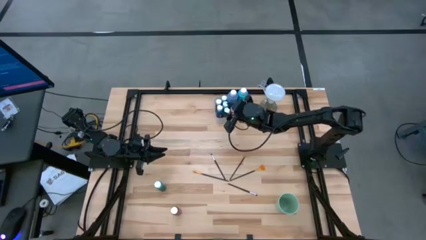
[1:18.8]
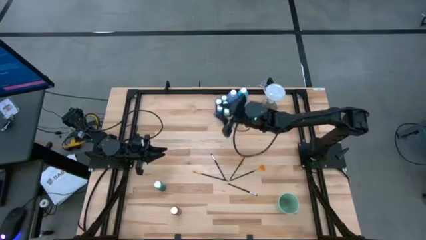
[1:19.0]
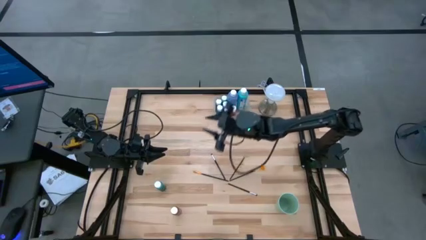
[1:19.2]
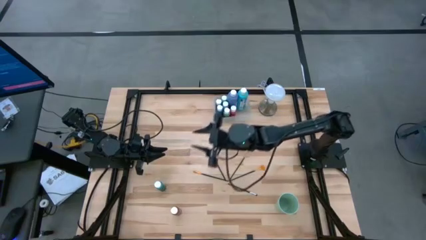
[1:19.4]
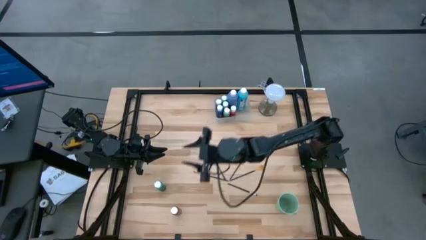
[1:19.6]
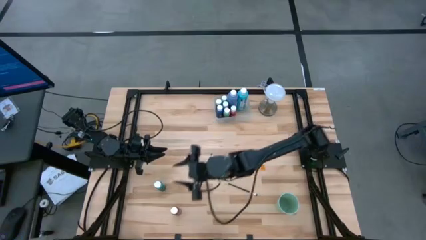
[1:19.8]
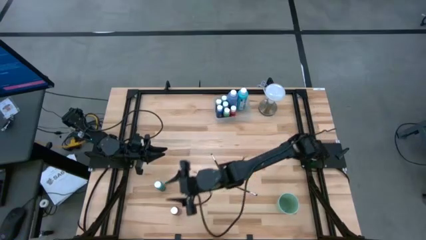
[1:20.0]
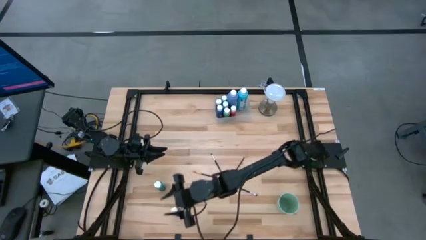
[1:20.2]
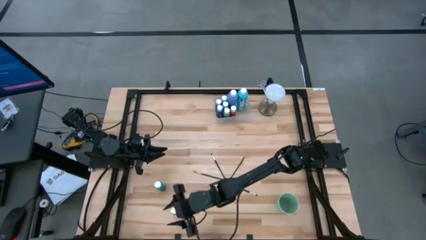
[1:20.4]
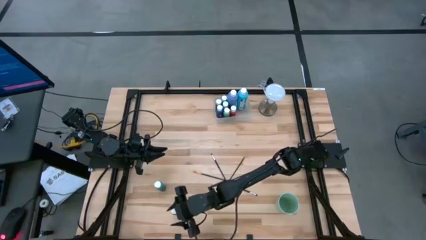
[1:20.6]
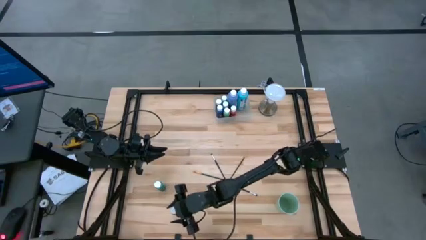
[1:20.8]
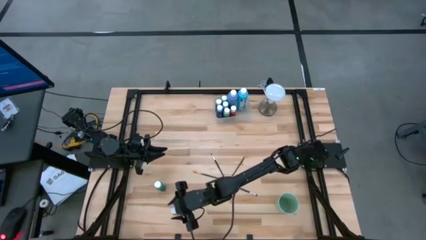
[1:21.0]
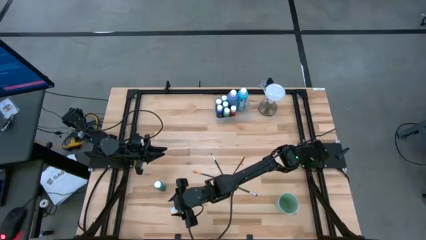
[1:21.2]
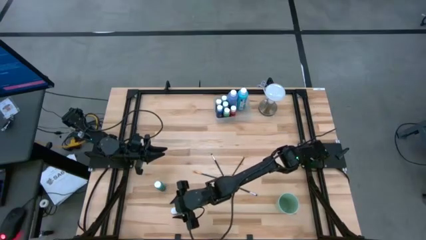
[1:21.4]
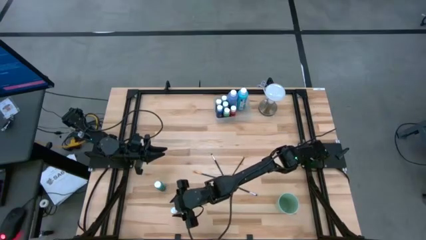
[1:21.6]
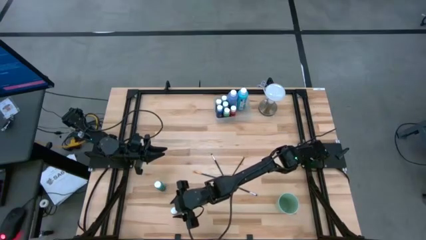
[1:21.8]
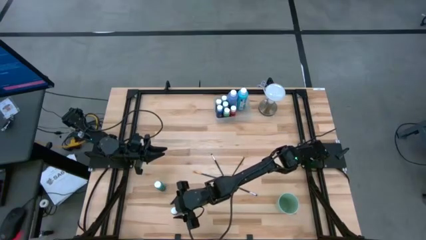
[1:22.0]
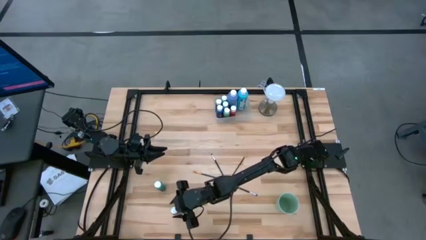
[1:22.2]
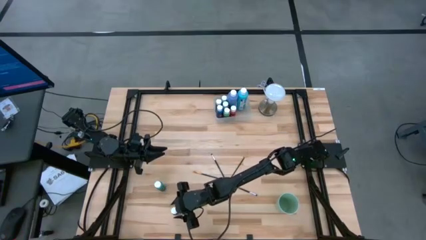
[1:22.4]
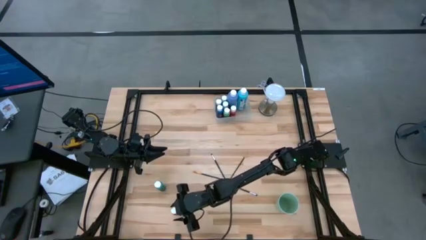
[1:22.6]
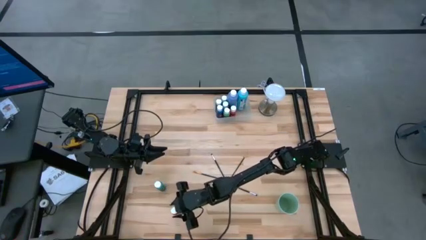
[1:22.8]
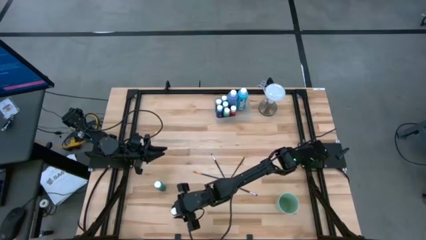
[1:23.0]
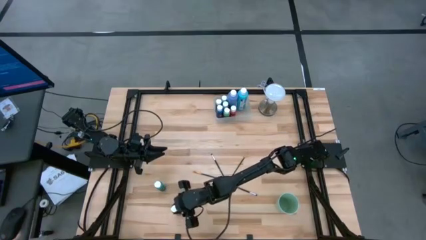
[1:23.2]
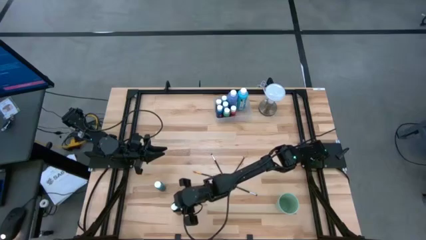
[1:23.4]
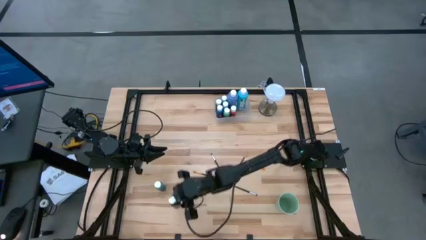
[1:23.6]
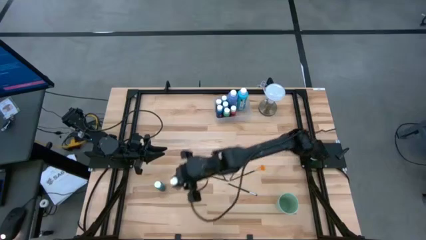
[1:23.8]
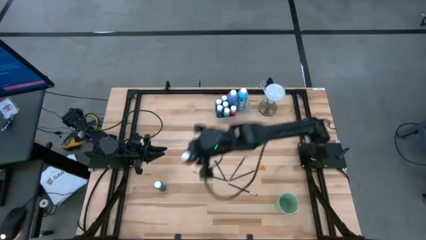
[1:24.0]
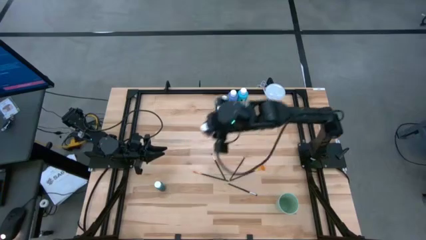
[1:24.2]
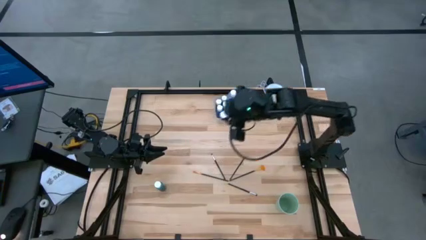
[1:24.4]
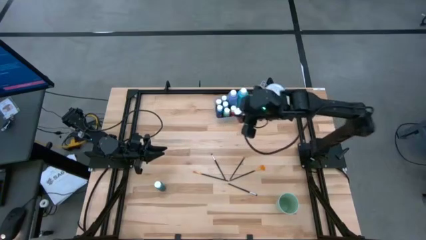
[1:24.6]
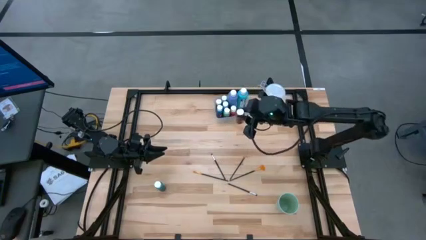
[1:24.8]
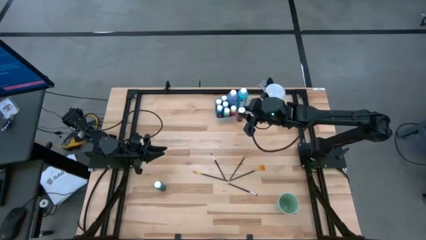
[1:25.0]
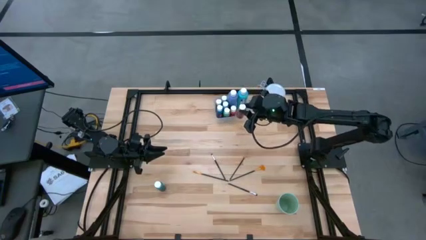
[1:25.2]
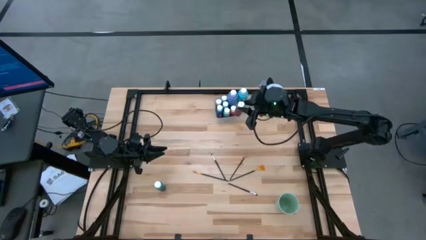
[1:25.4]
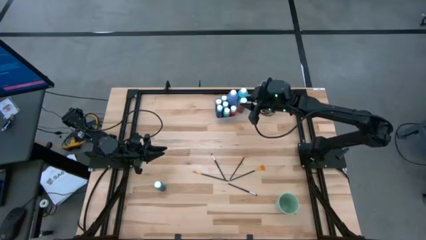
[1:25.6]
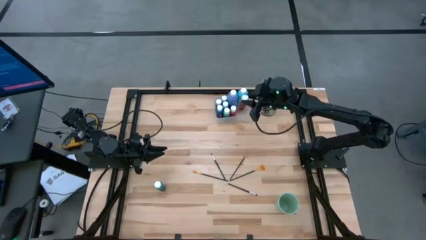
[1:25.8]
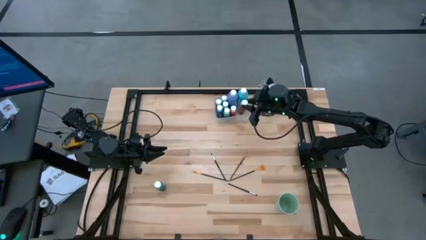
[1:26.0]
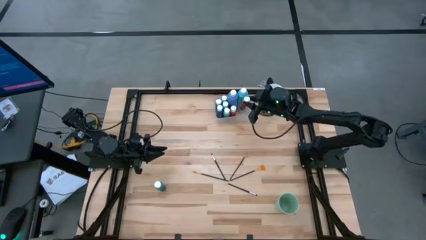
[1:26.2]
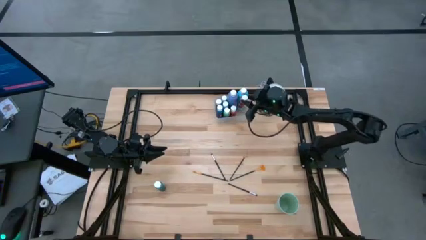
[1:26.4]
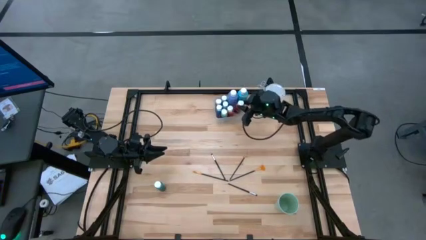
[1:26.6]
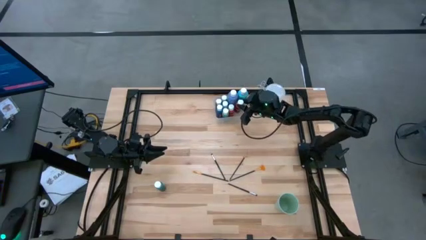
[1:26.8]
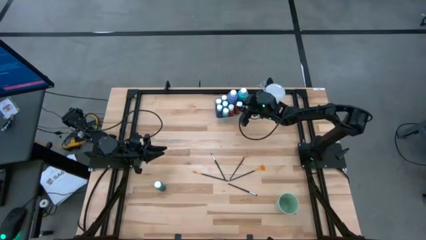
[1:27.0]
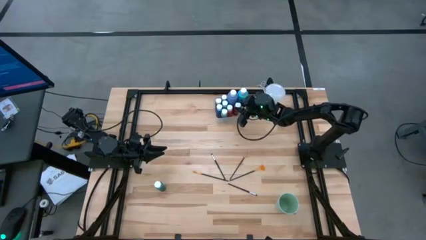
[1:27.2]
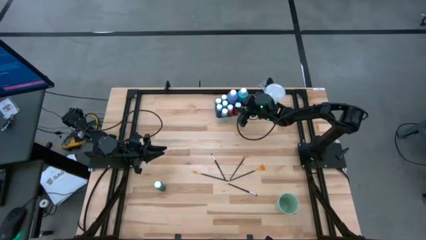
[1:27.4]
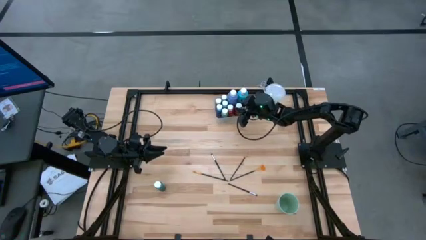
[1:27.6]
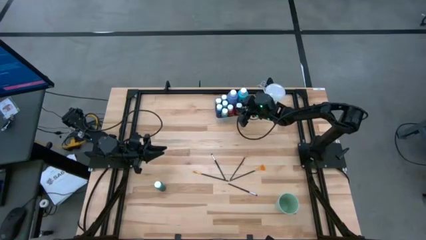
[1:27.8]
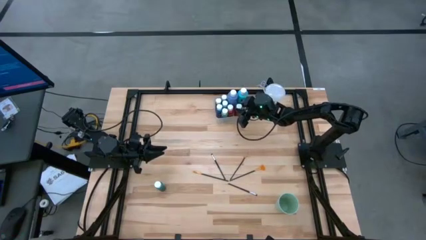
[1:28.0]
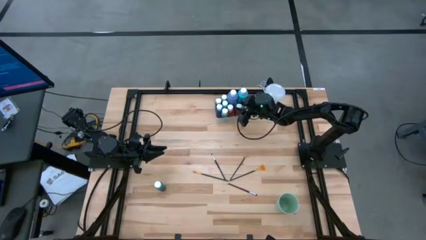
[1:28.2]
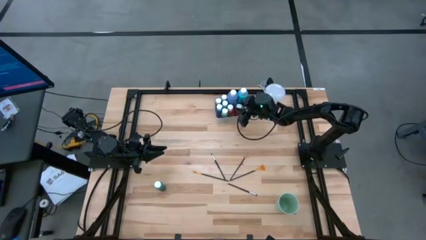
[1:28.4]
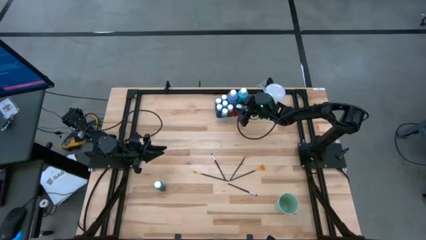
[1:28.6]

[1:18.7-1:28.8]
Task: Pick & Place Paint Supplies
Put the red paint bottle into the transparent bin

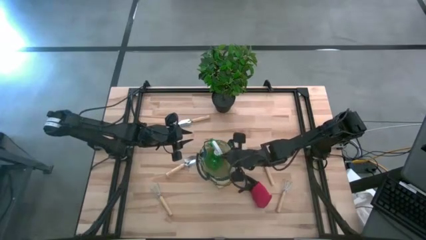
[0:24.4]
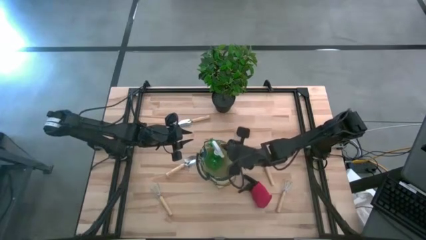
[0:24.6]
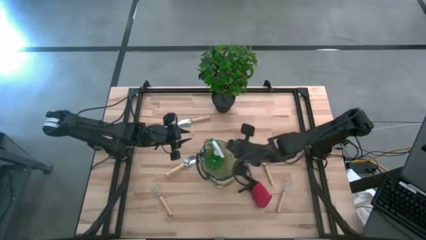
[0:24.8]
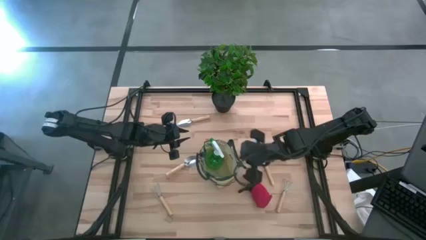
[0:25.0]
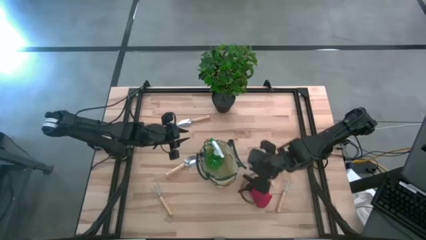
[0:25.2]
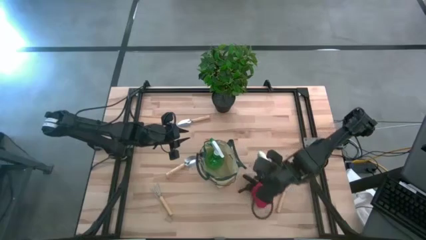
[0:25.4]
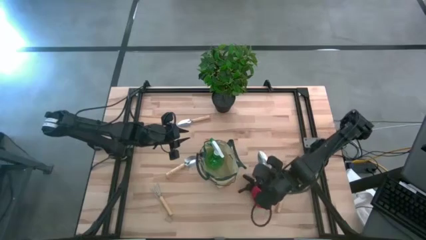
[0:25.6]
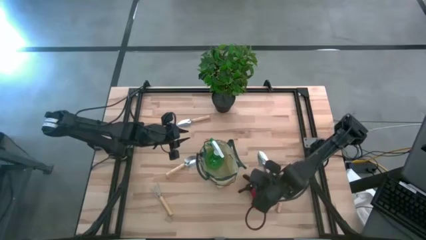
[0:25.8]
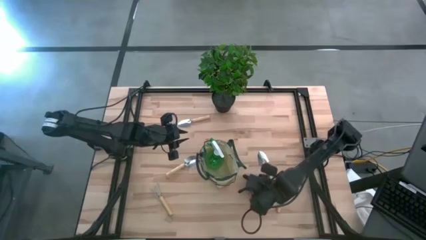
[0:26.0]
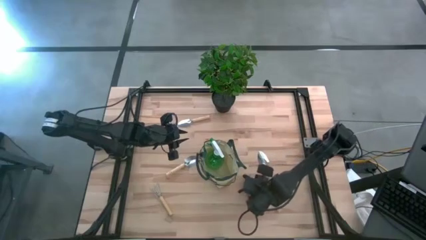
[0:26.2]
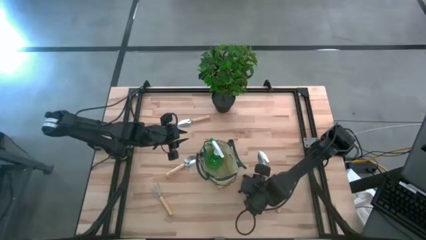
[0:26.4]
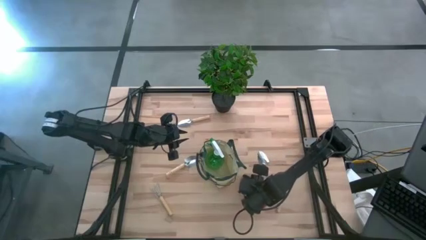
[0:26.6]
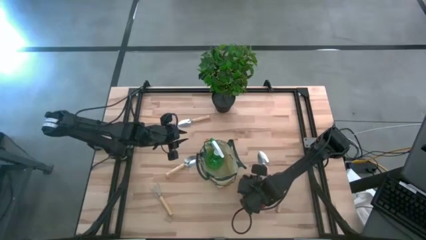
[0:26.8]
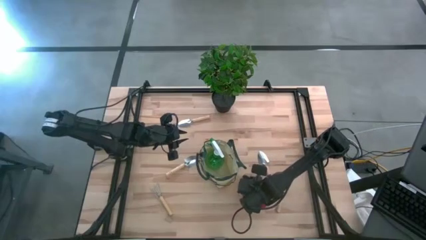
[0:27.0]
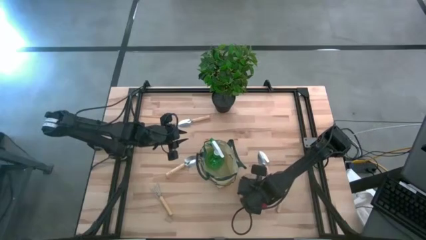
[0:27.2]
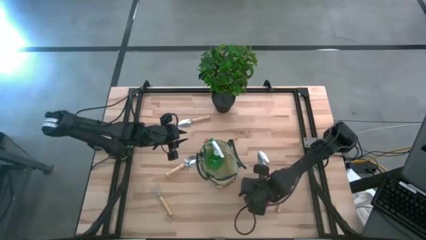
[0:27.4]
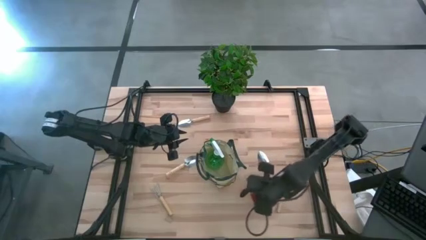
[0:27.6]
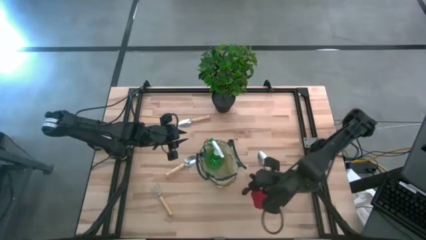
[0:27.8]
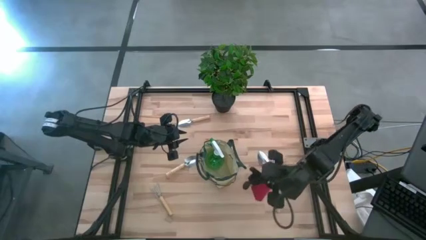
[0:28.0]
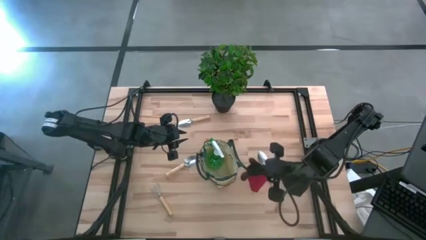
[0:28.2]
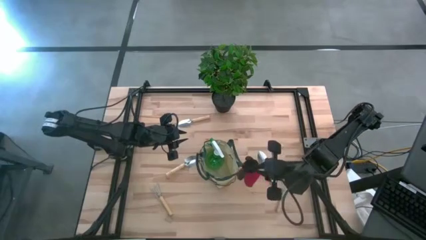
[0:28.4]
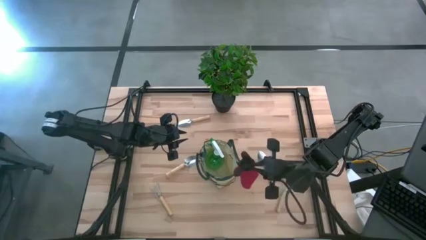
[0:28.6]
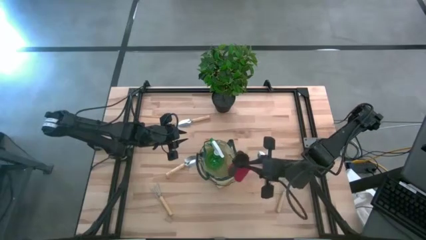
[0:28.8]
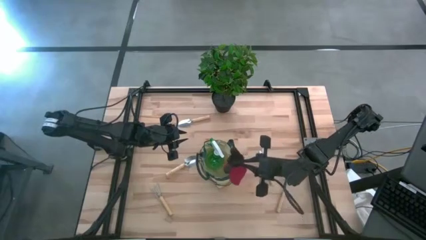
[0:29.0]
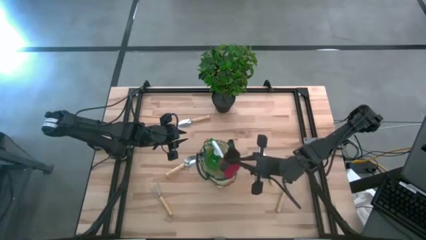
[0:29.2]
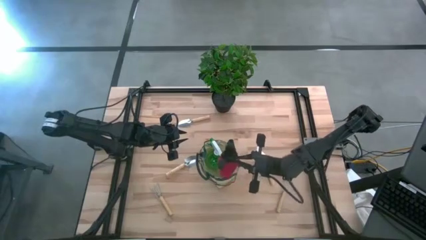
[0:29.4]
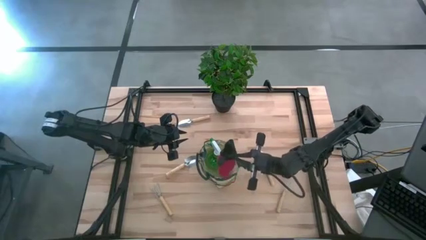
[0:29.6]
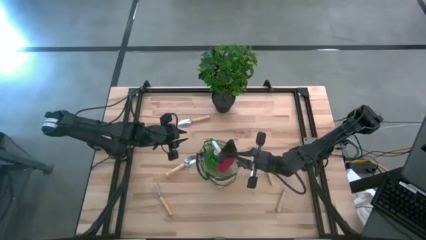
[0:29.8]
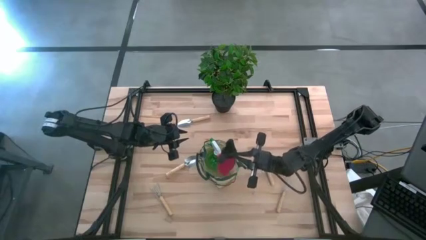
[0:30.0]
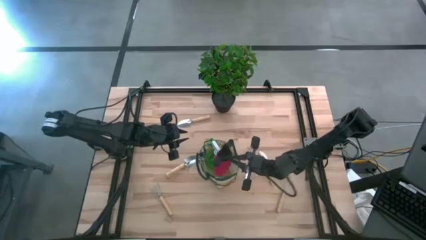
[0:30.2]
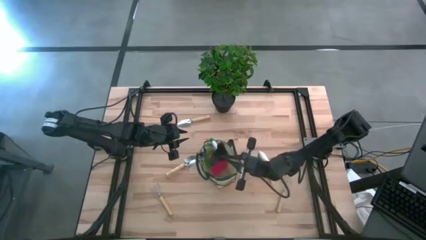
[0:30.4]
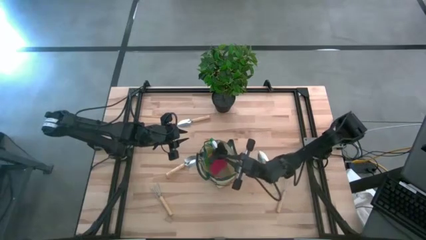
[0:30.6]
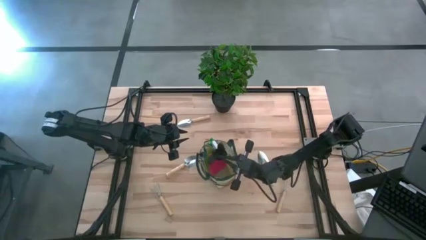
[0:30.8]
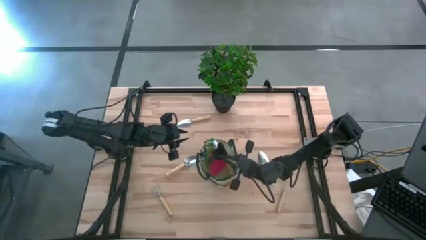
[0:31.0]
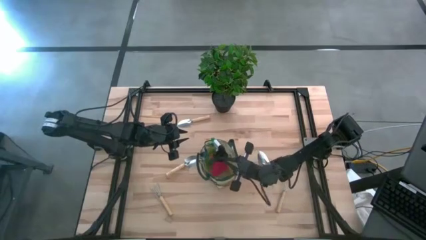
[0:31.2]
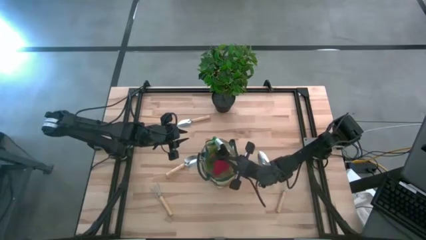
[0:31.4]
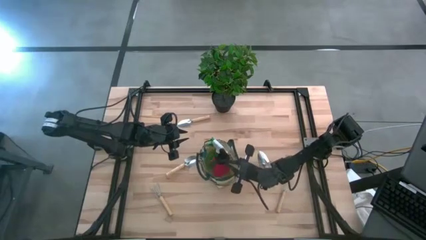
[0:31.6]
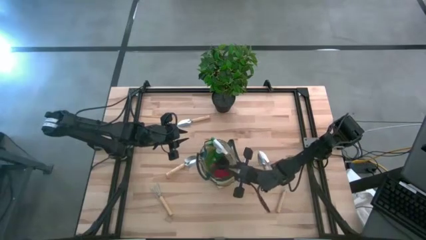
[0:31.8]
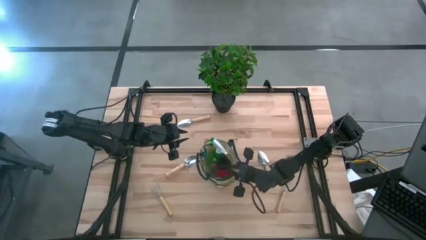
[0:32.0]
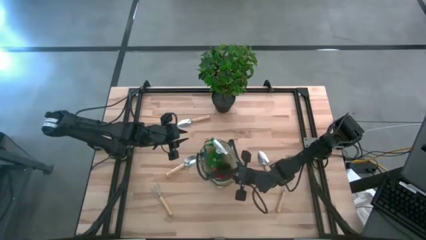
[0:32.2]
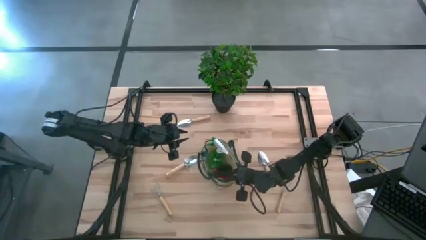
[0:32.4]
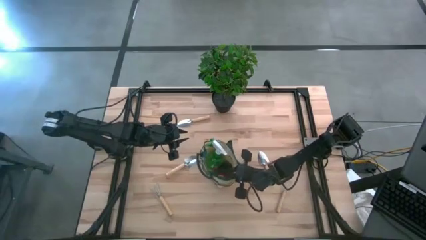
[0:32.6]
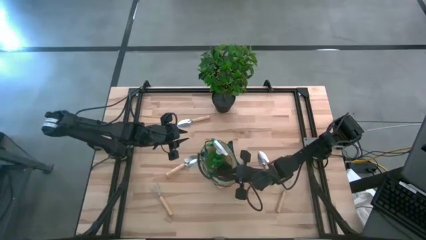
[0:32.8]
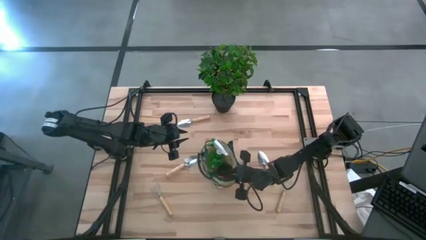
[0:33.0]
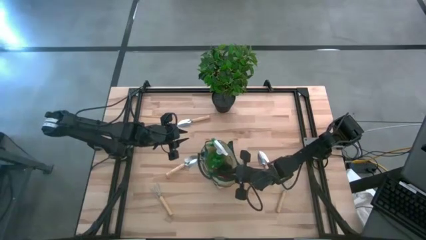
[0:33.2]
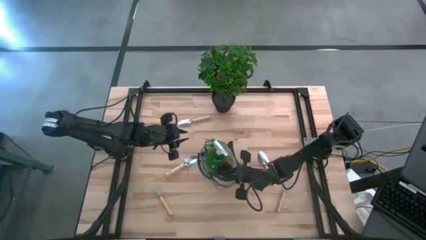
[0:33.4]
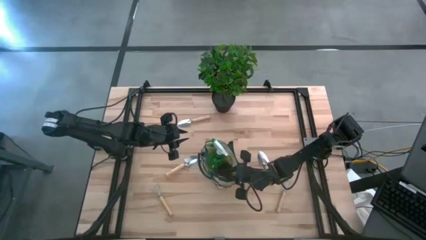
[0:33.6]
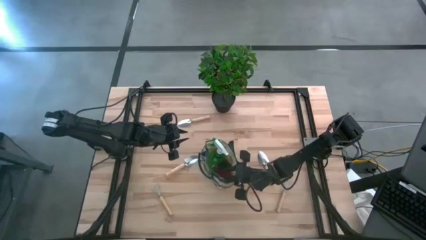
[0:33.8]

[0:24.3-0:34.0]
Task: Pick & Place Garden tools in Gardening bag
Put the red gloves into the green gardening bag
